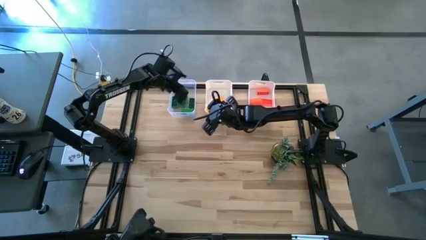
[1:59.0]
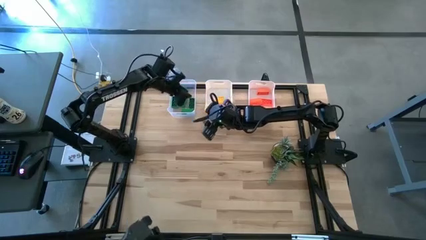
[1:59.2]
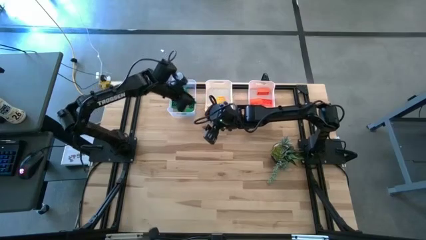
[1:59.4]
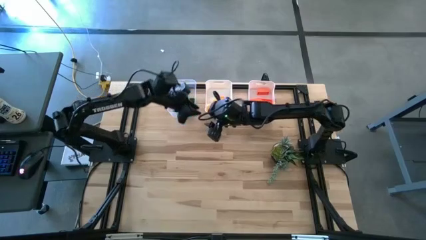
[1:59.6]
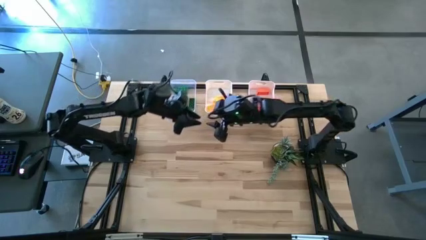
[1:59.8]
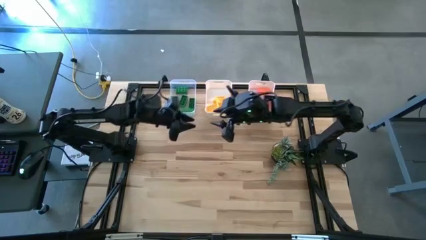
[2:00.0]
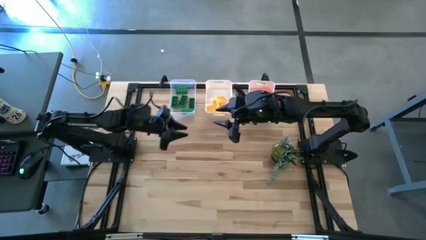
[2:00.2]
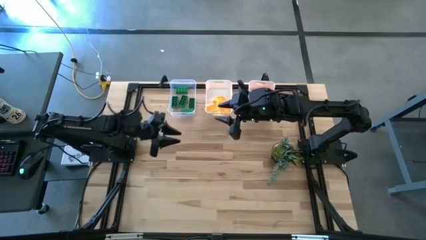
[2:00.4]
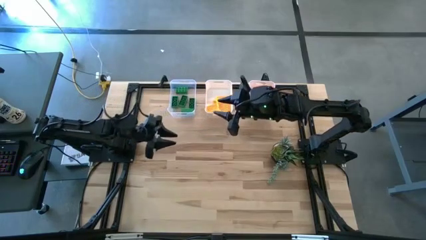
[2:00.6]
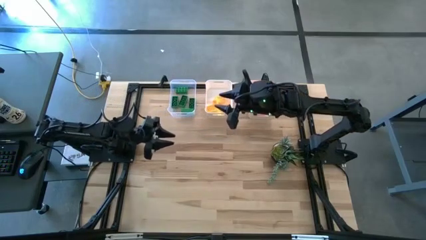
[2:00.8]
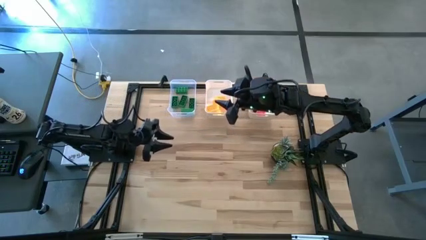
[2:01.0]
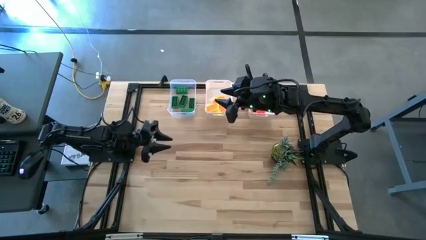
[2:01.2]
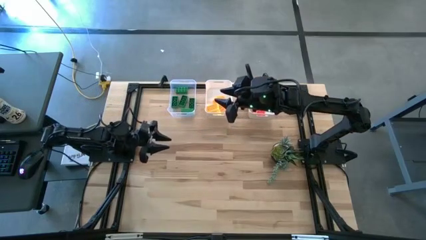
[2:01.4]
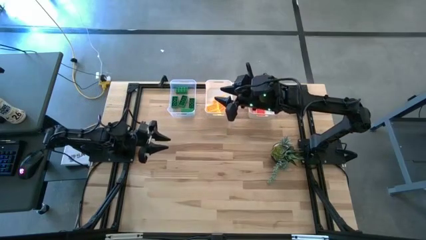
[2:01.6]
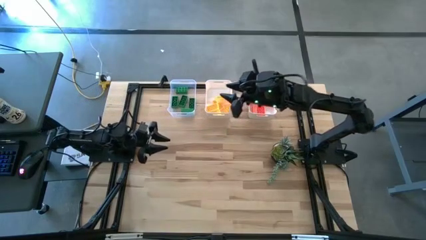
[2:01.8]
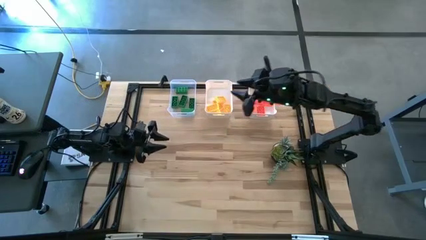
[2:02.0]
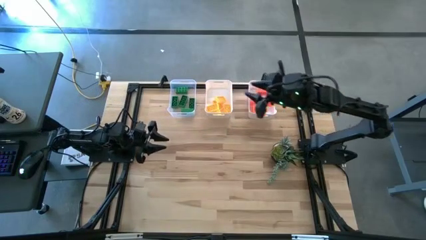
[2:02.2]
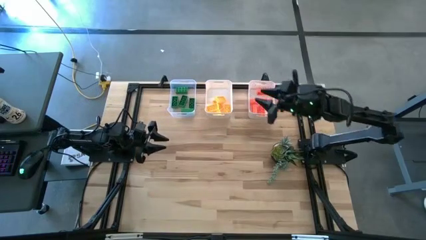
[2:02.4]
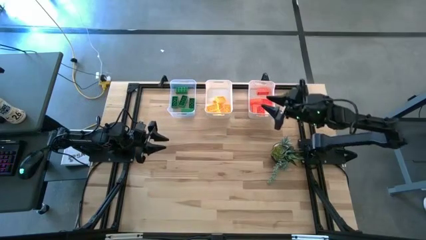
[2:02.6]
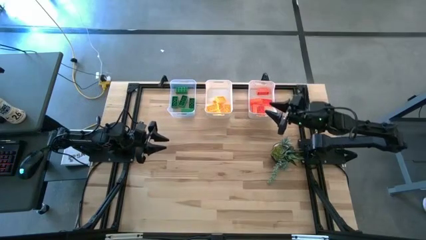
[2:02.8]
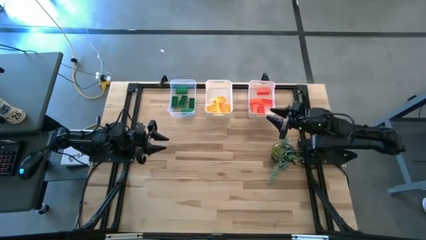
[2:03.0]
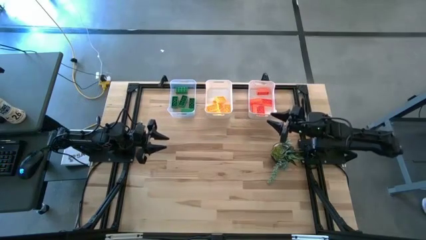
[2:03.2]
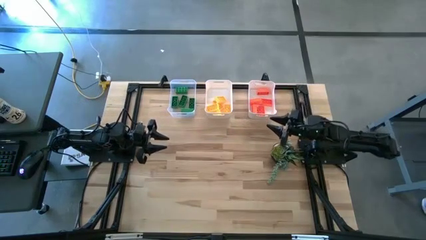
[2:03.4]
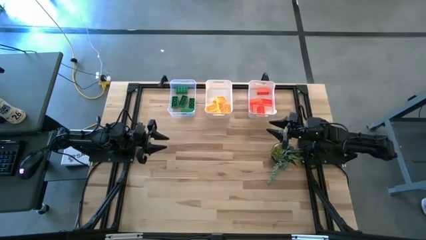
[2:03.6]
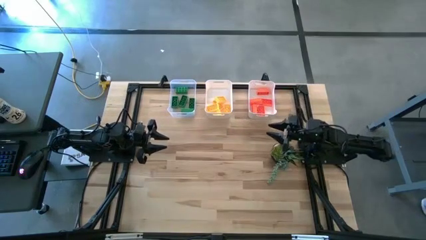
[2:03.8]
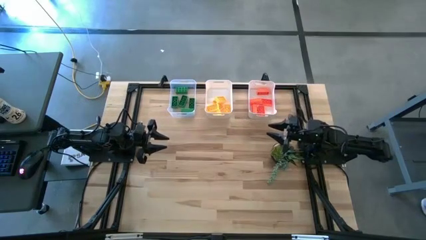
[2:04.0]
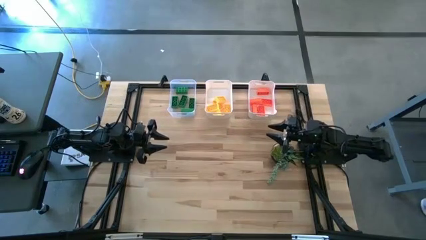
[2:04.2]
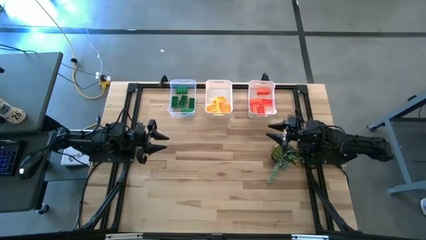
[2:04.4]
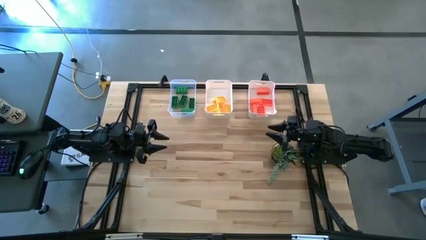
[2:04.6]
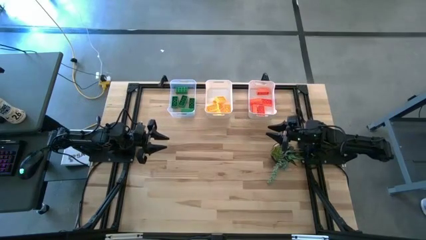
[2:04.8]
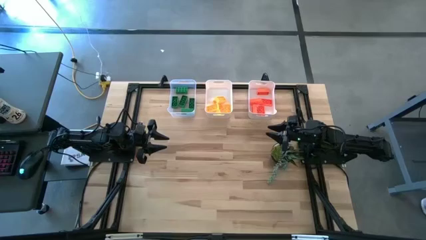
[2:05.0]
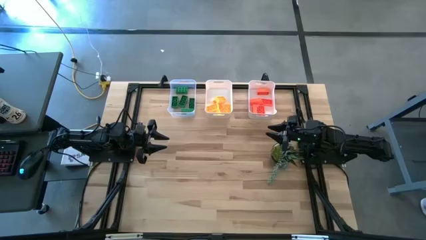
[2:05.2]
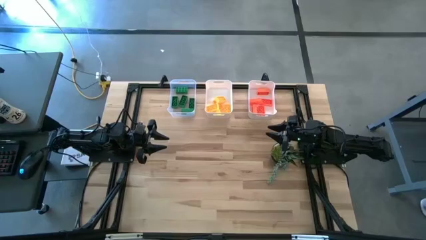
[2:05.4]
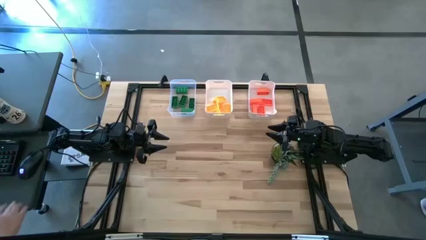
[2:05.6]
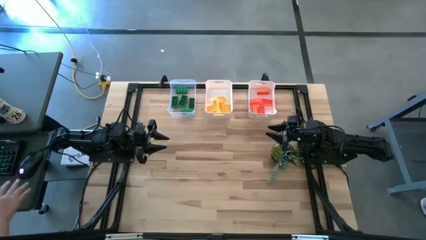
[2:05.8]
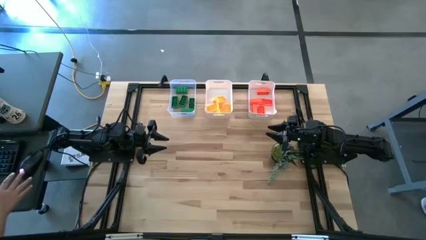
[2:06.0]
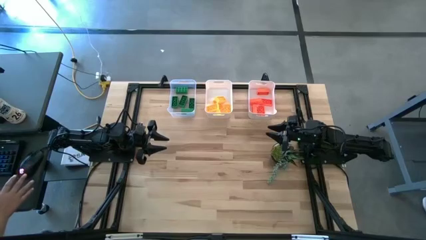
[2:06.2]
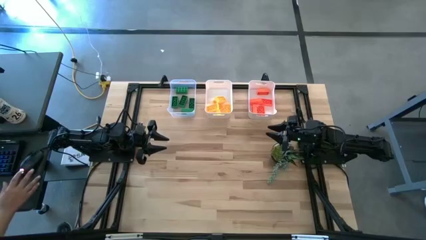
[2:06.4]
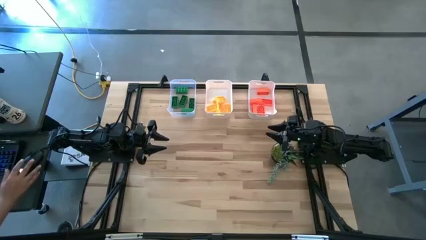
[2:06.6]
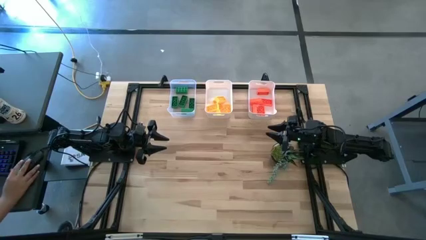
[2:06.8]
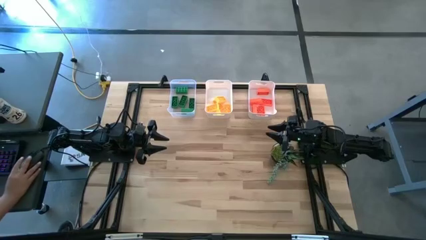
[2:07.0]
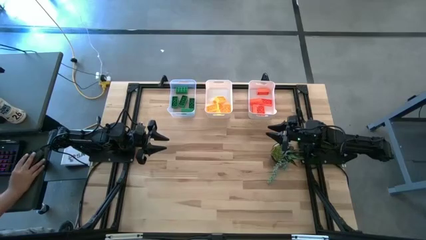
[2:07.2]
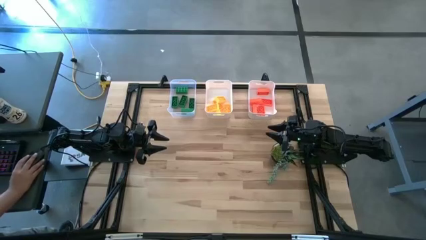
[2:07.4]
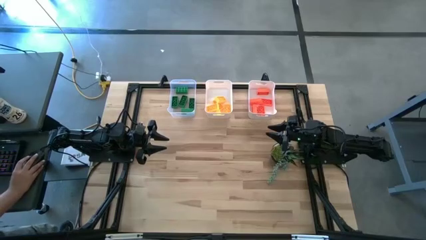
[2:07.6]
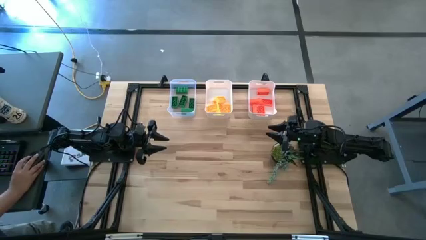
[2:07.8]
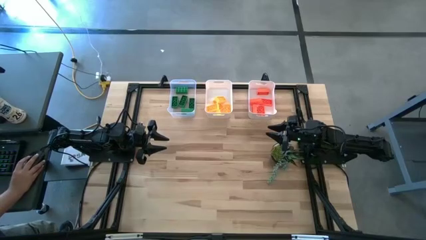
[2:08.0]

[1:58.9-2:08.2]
Task: Sort & place blocks by color
Return to Home Position
